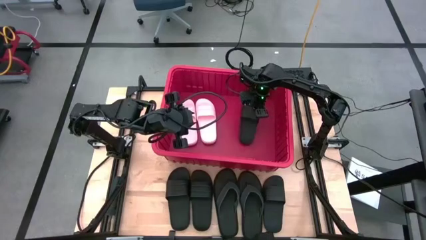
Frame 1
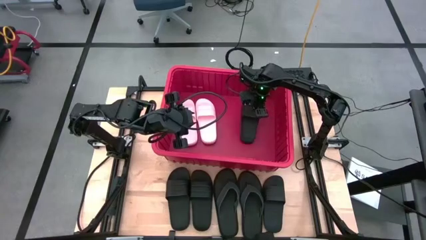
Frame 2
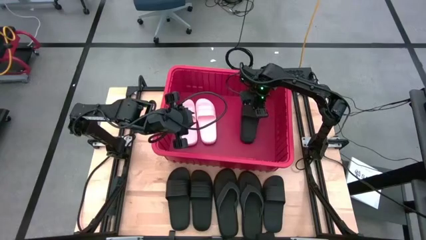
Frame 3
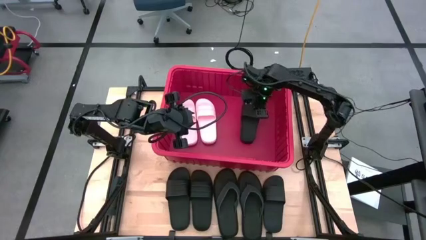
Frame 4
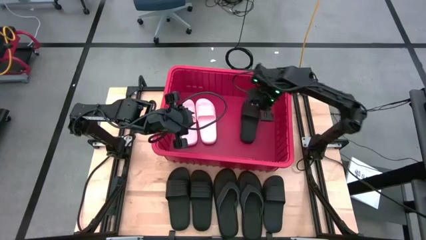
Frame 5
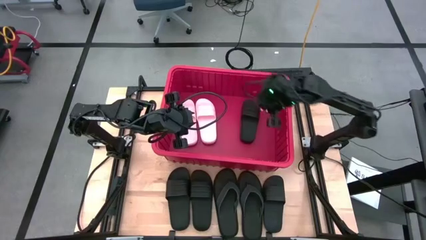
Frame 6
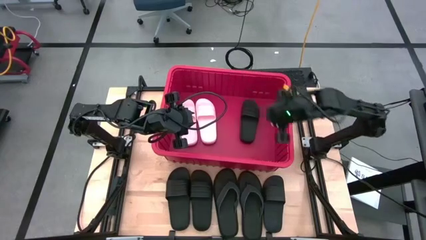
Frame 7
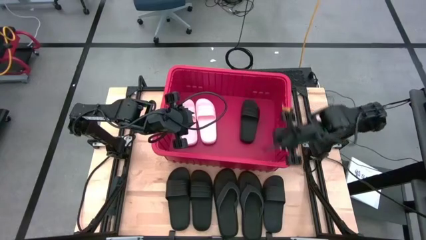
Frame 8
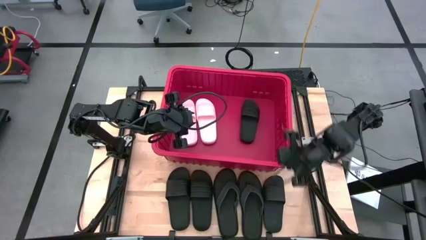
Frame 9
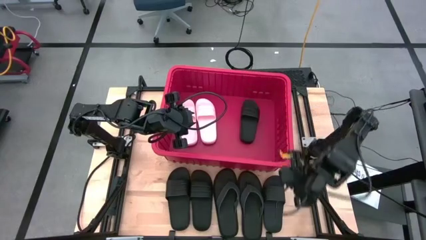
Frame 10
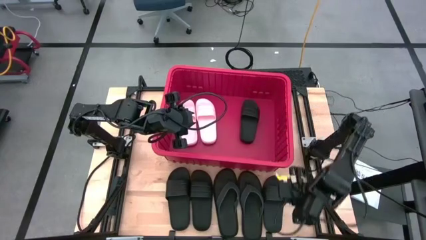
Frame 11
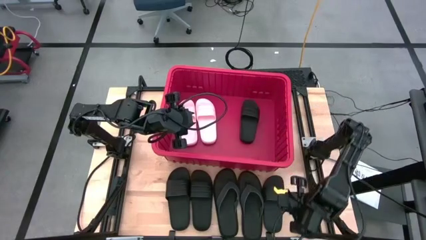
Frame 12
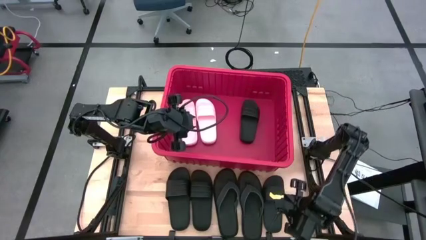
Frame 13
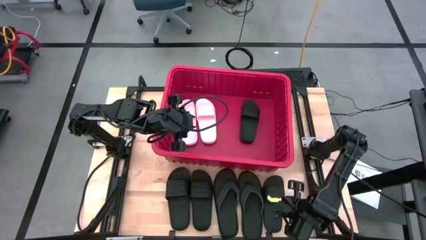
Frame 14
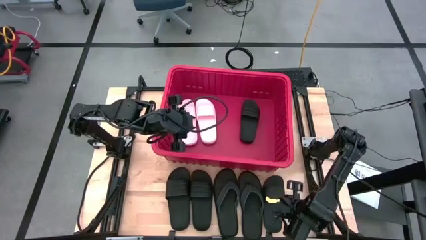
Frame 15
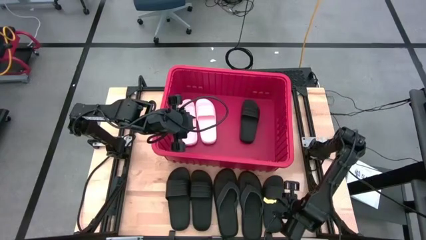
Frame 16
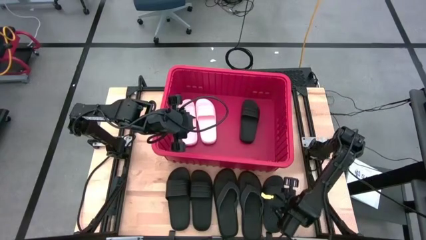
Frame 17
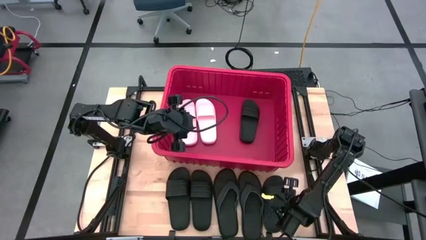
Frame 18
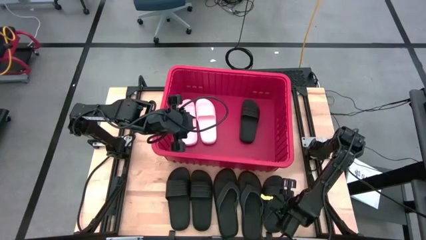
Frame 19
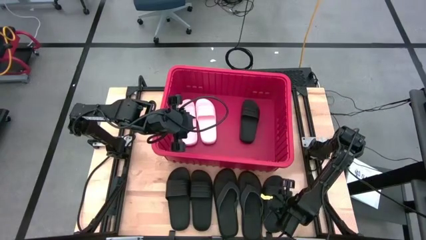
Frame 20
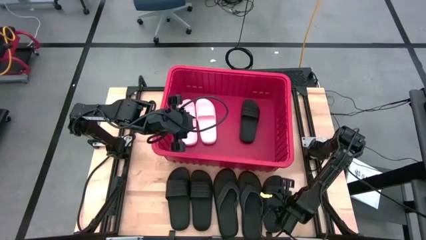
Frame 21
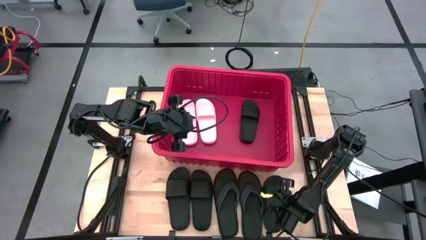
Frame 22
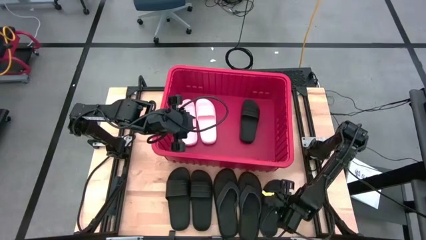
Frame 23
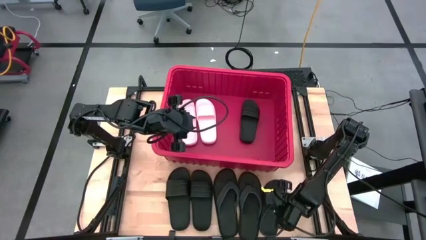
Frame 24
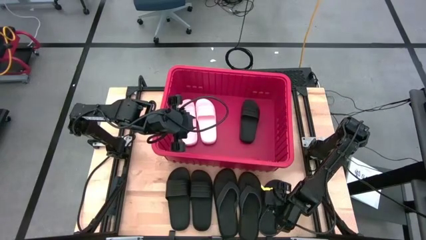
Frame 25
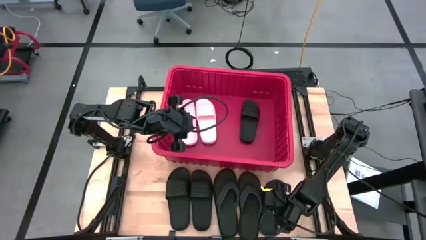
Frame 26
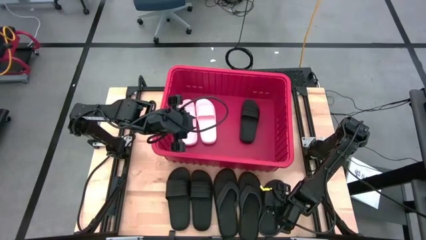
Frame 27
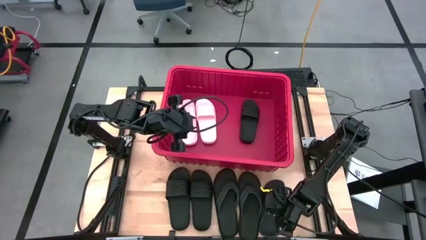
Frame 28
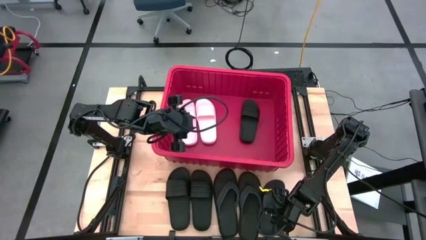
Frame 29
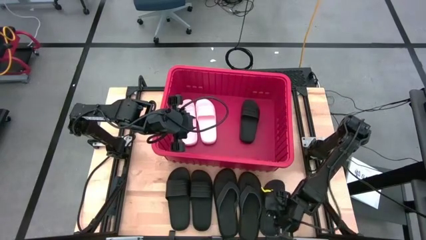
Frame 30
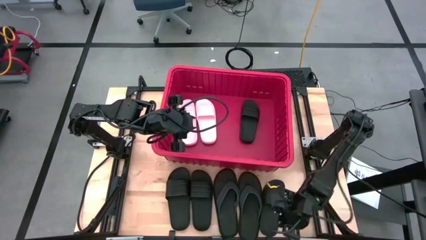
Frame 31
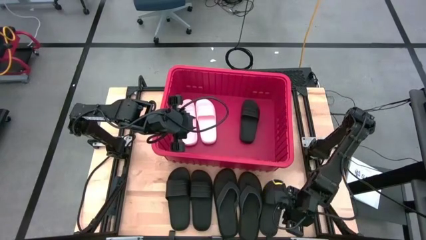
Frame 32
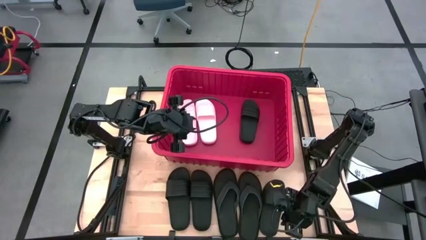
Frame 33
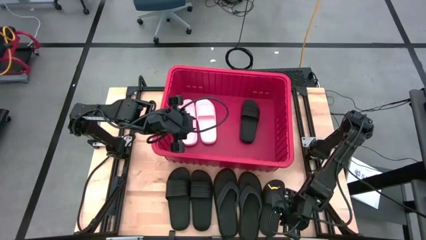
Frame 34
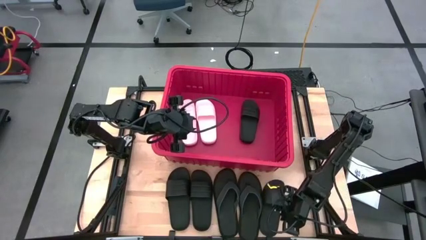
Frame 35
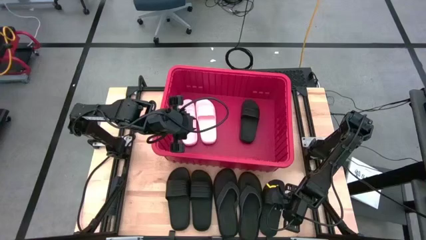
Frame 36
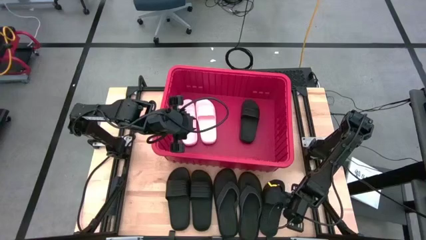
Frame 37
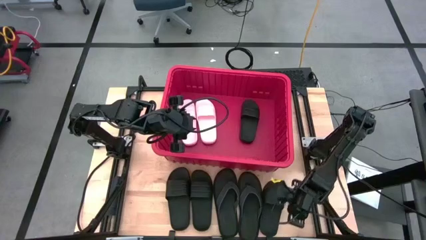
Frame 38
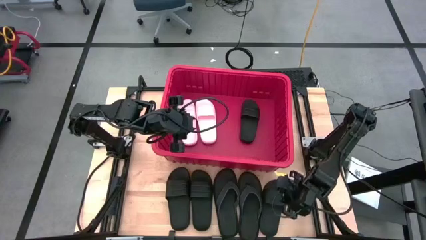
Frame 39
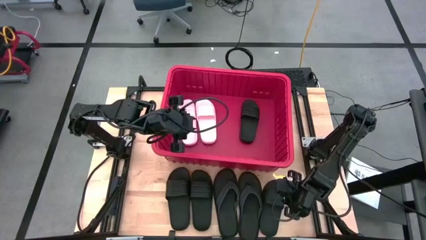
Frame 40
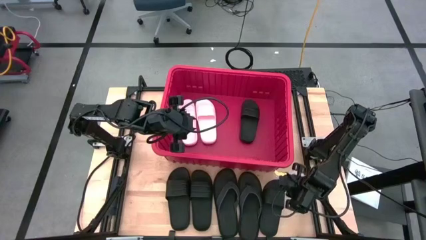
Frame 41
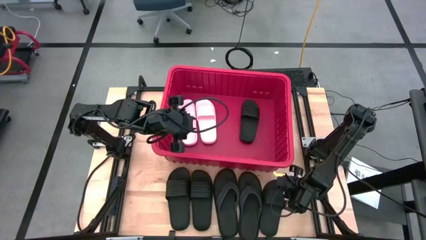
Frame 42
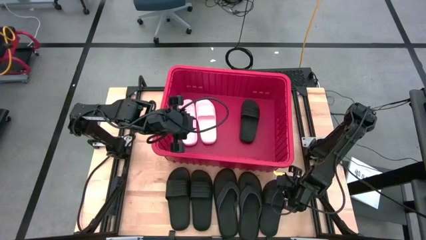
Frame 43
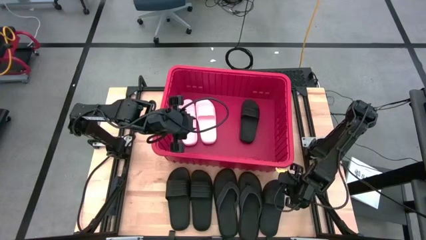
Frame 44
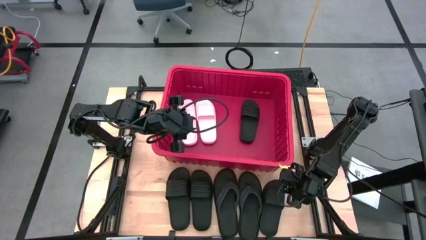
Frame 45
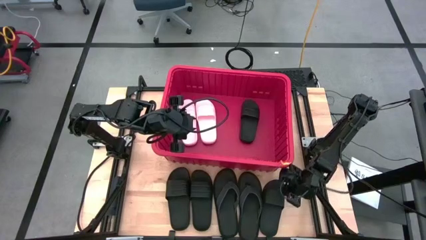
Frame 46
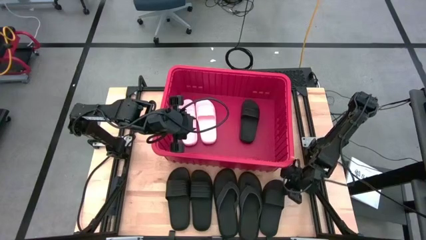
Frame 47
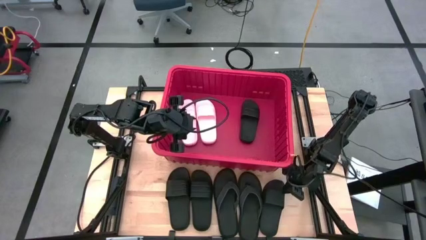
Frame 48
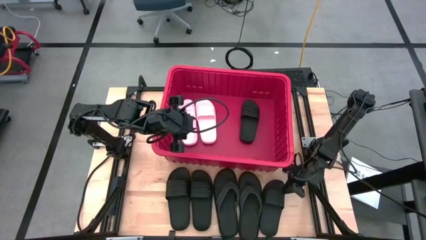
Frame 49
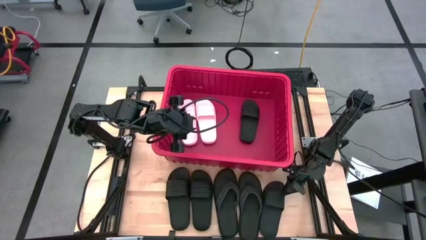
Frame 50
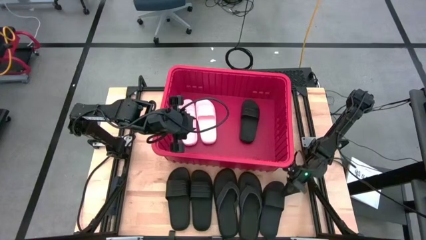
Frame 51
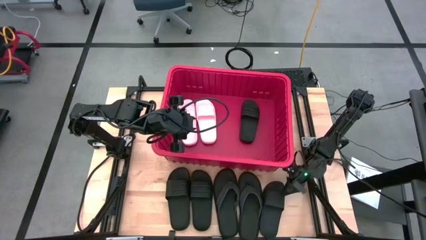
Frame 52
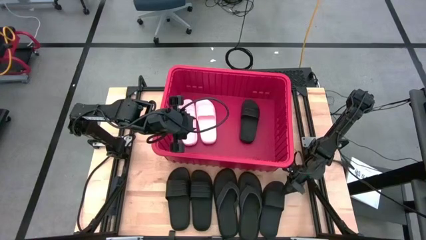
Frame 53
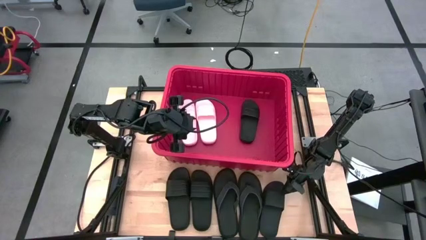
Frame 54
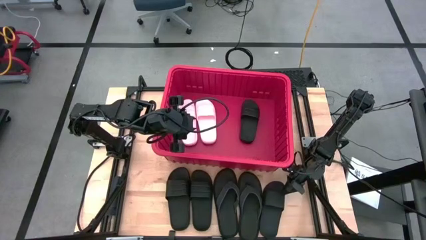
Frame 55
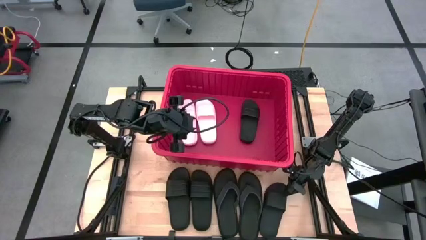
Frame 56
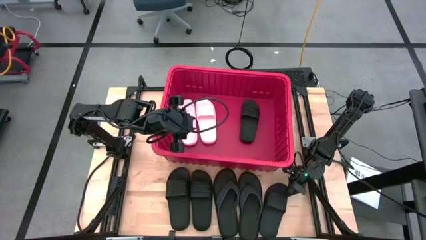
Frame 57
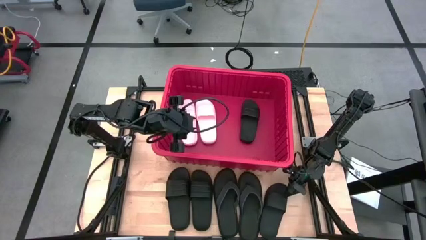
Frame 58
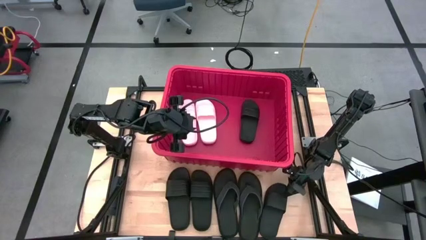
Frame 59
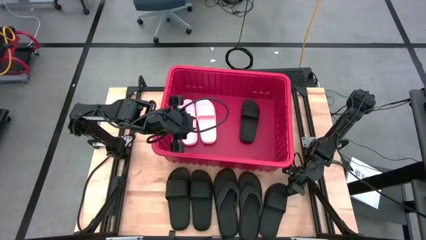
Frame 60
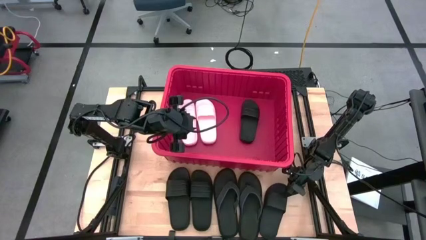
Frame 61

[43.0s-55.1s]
Task: Pick and place slides into bin
Put the right black slide into the bin

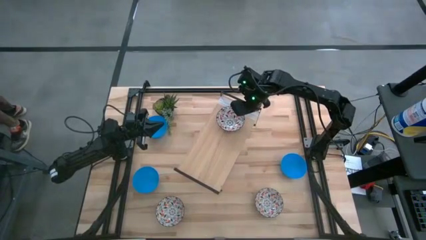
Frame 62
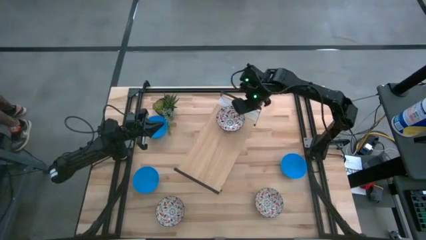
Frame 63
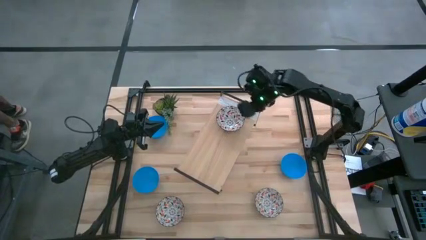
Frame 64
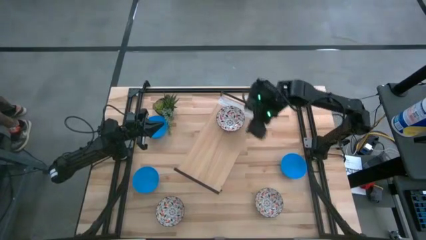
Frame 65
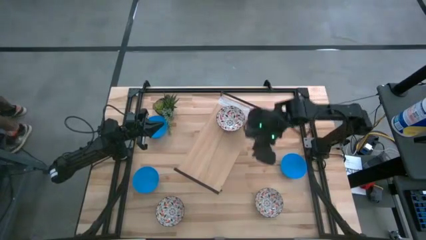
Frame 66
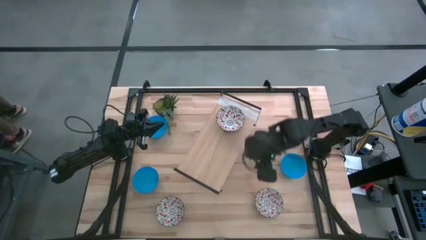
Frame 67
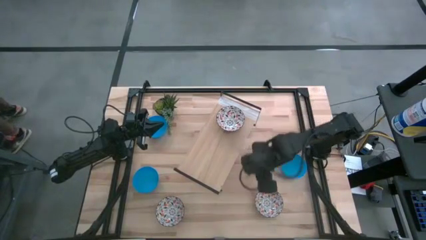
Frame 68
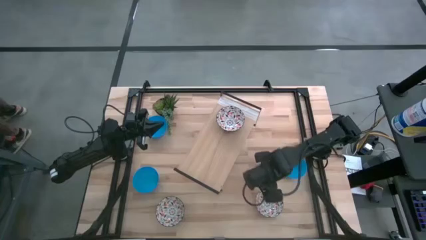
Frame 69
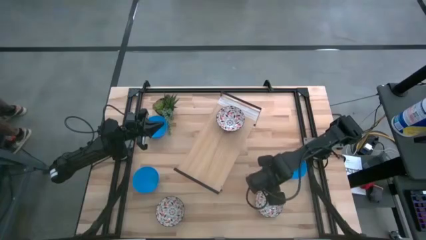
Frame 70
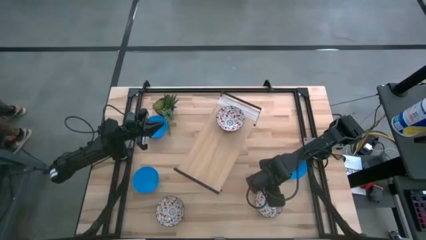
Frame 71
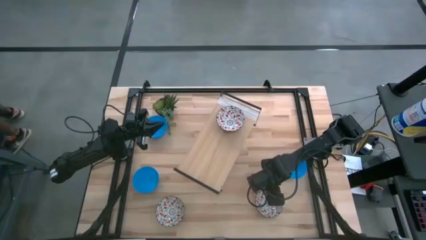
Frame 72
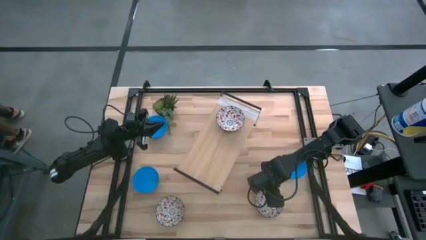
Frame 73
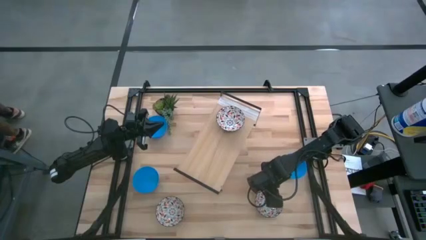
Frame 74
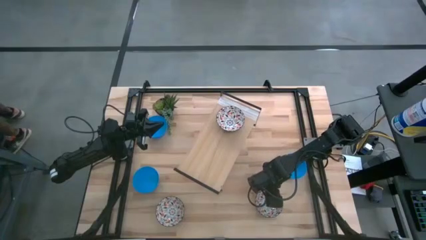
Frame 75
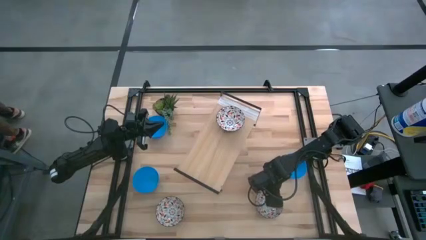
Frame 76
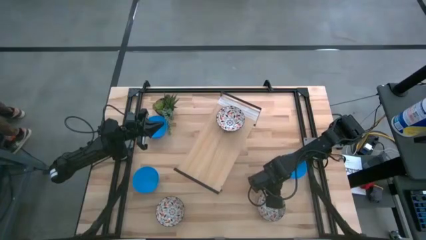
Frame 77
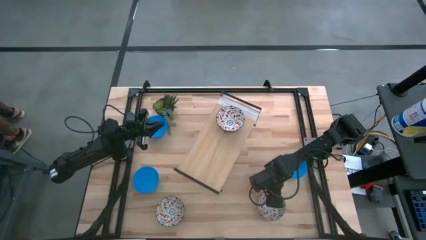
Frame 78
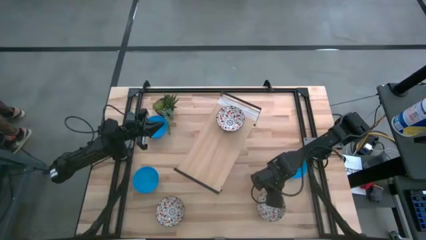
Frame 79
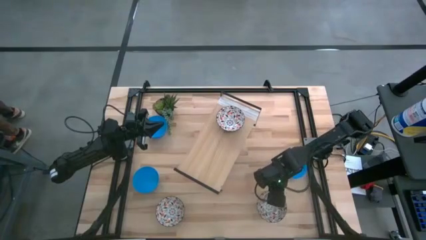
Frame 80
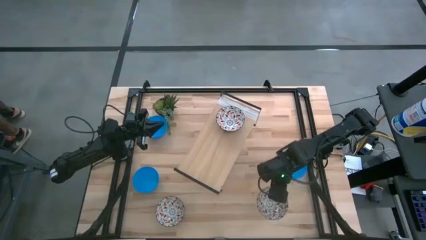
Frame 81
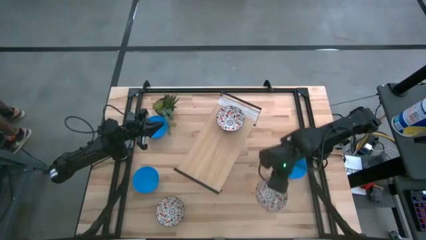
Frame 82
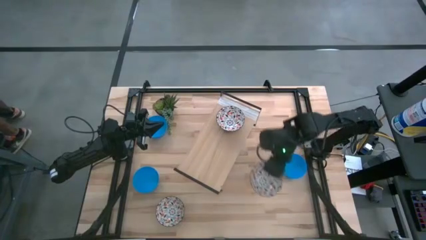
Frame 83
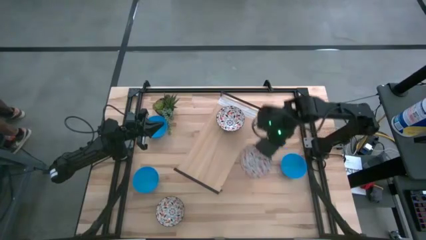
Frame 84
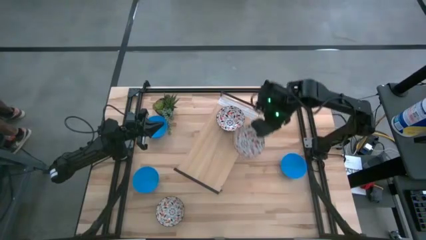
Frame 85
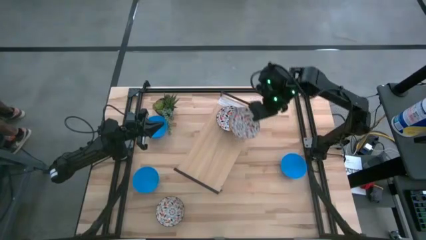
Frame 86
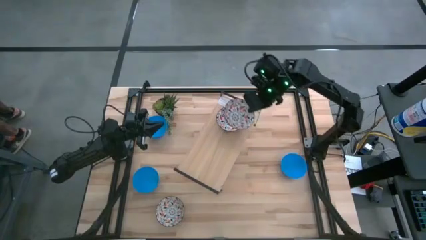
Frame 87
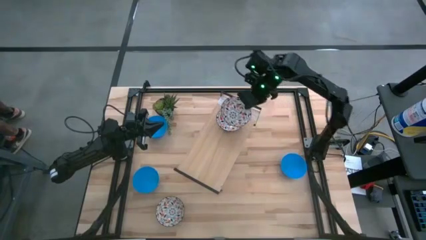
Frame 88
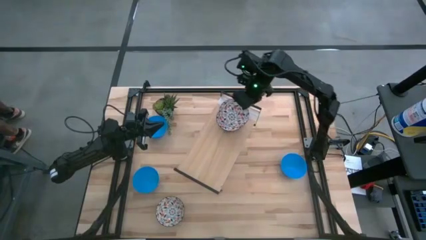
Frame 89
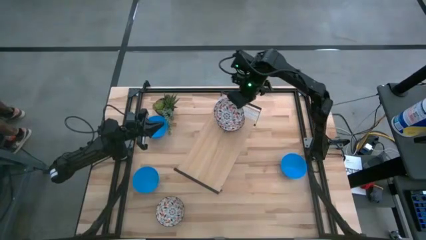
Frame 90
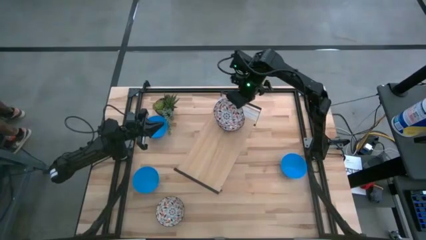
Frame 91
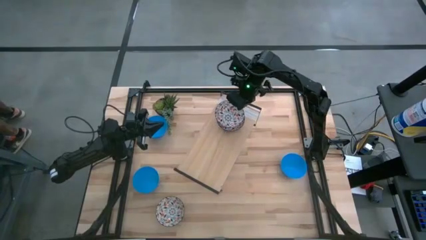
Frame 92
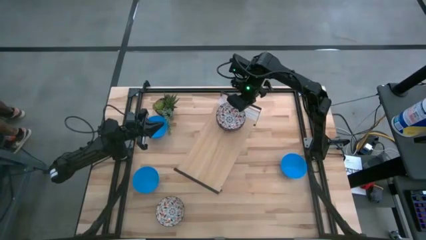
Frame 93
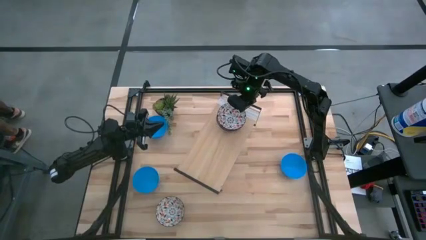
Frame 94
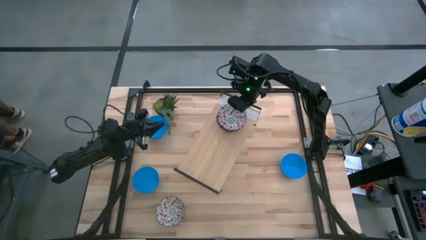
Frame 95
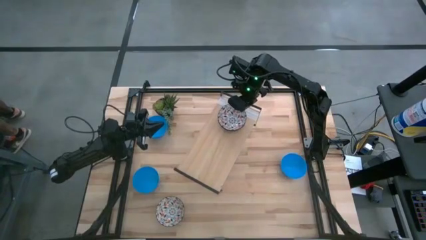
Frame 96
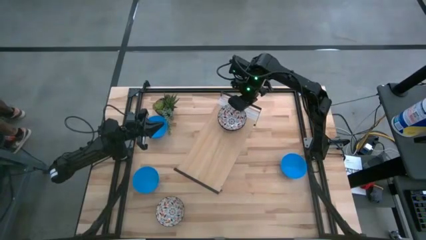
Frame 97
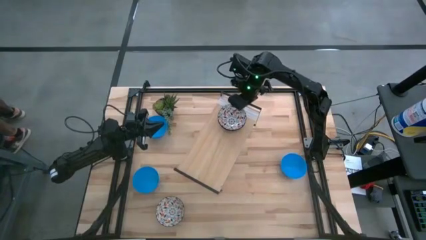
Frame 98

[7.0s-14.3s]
Task: Pick & Place Mini bowls
Stack the right white patterned bowl on the white patterned bowl on the shelf
